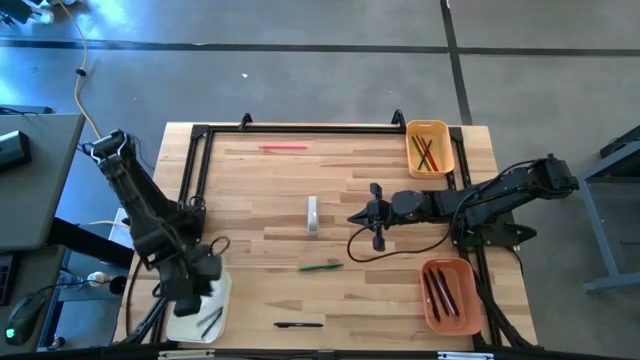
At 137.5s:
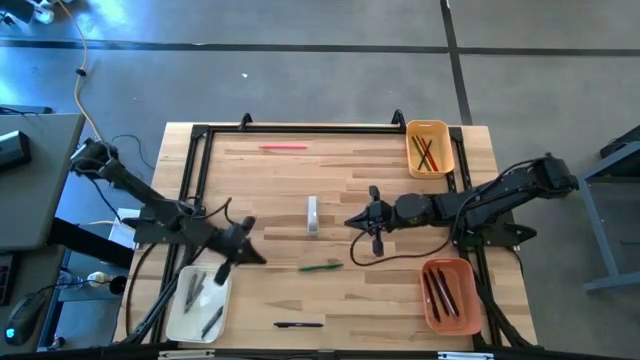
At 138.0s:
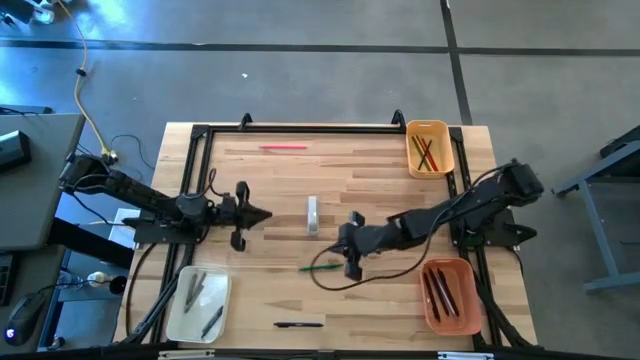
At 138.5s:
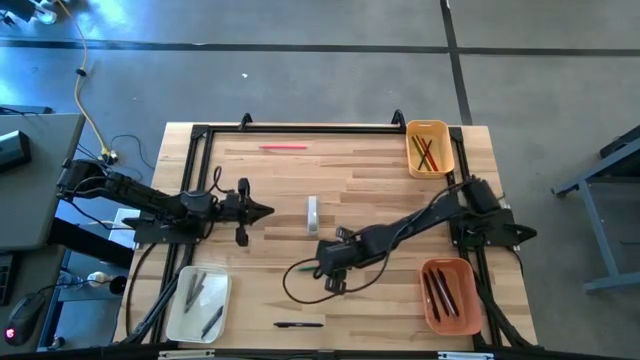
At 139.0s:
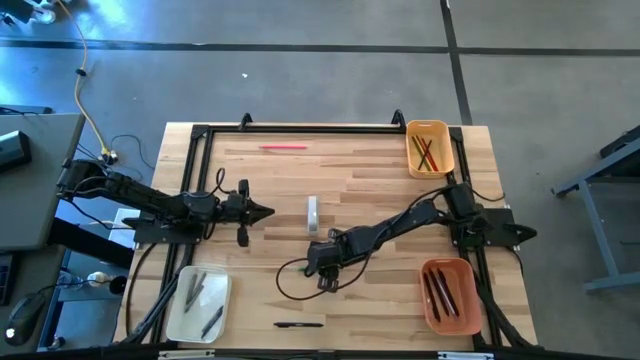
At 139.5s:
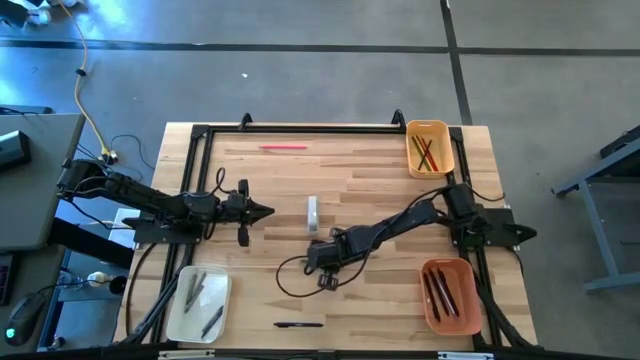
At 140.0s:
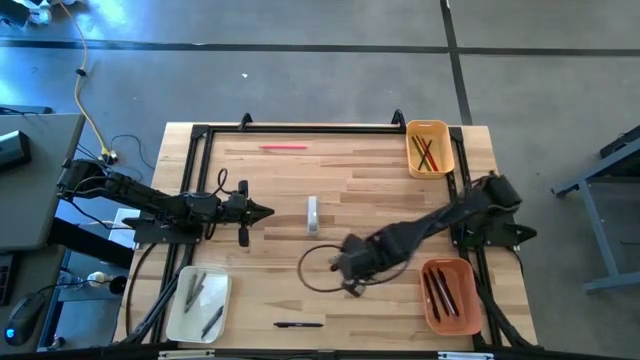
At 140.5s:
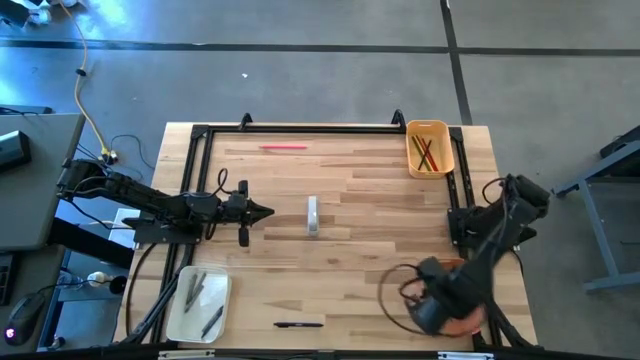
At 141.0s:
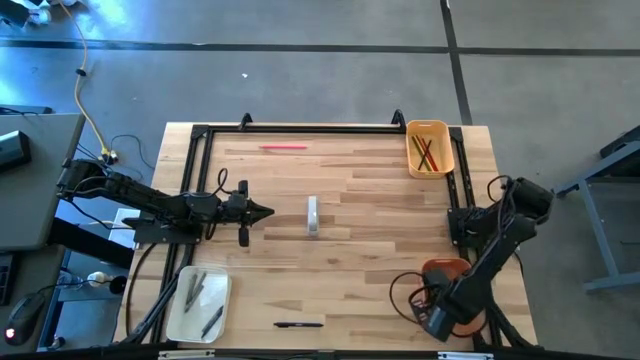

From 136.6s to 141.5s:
Task: Sort crayons/erasers/pens/pencils in bins
Put the green pen into the orange bin

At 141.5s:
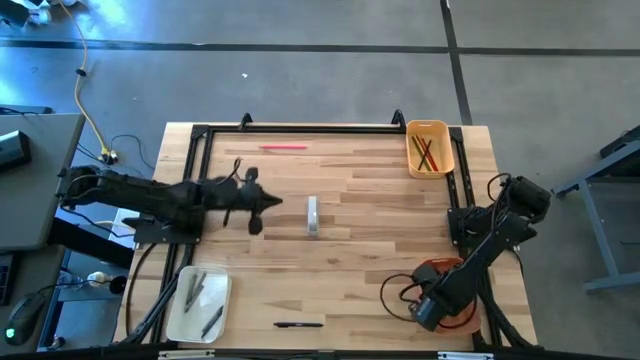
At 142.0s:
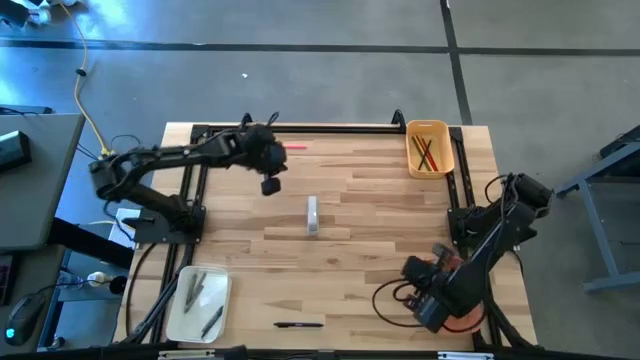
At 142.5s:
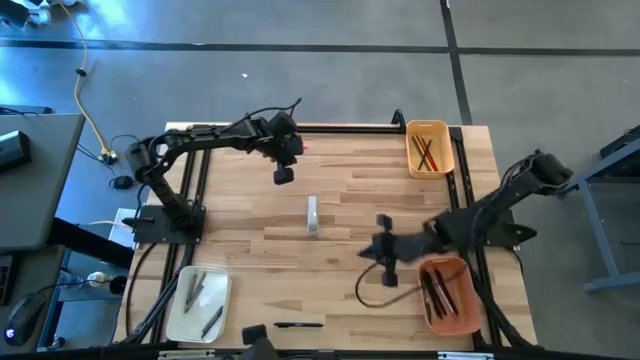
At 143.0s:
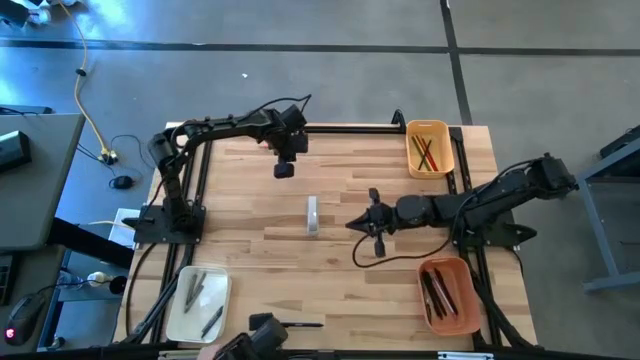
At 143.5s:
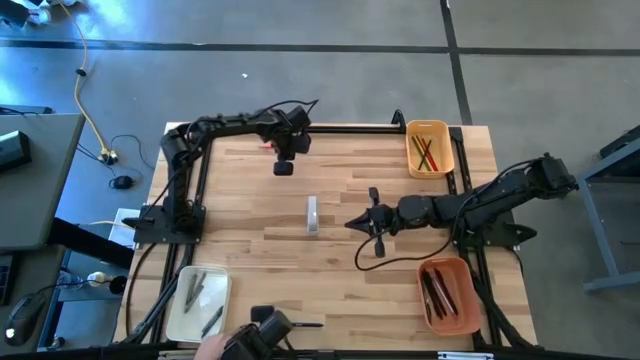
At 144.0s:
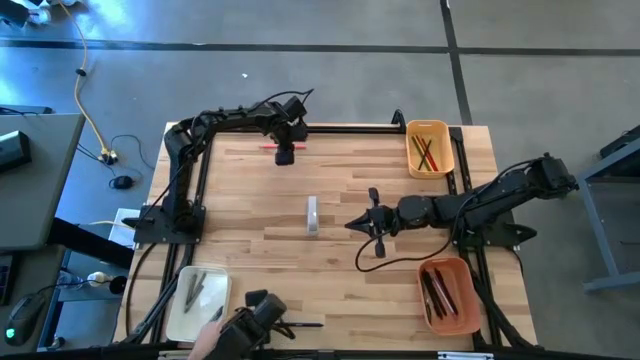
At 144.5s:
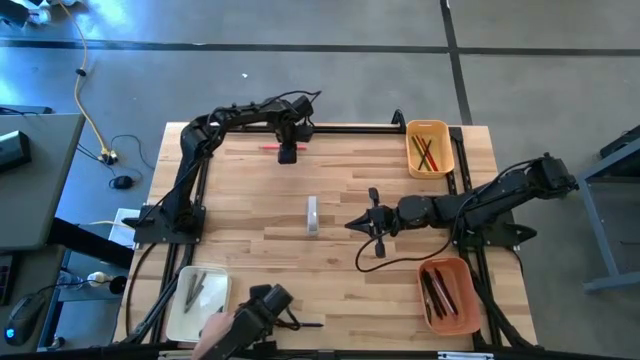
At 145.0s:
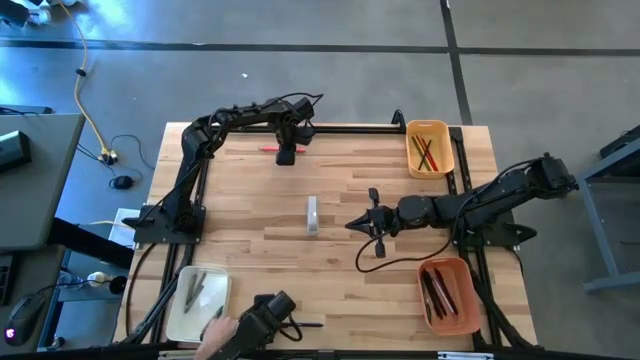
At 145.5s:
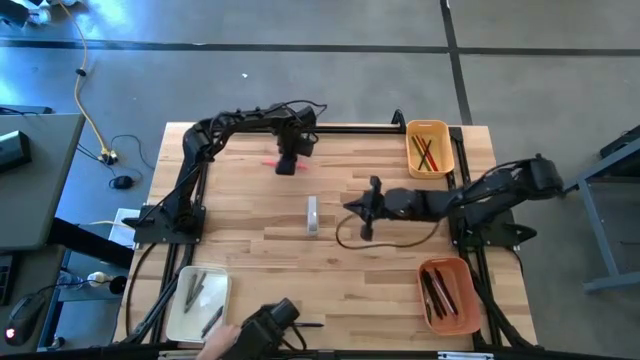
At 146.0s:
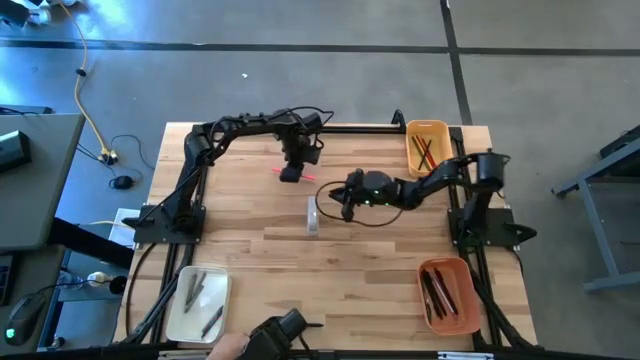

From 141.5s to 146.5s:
Put the pink pencil into the yellow bin

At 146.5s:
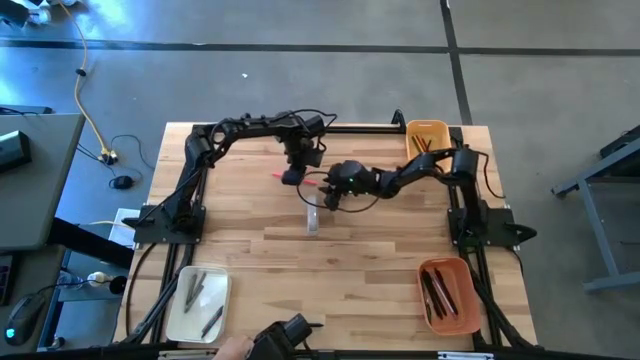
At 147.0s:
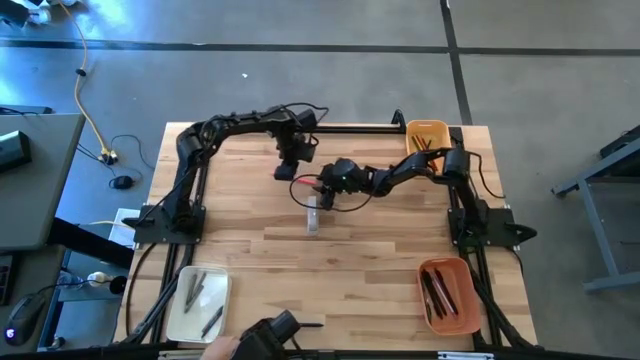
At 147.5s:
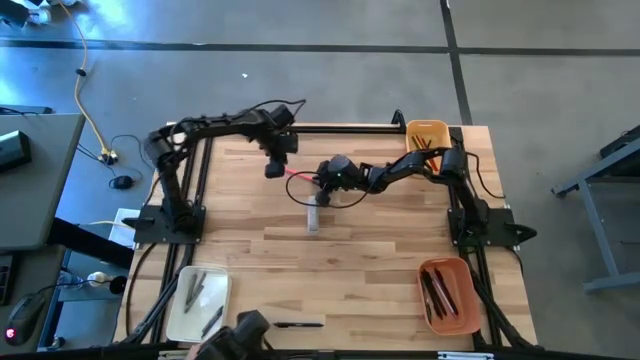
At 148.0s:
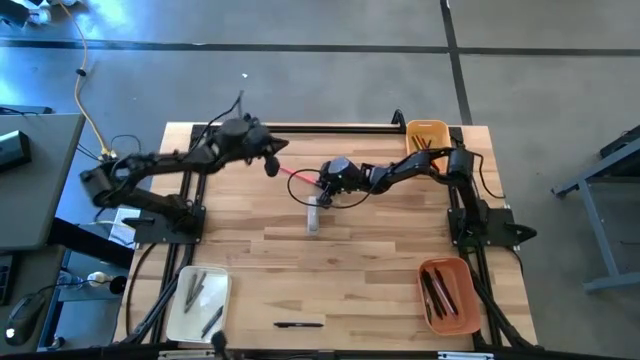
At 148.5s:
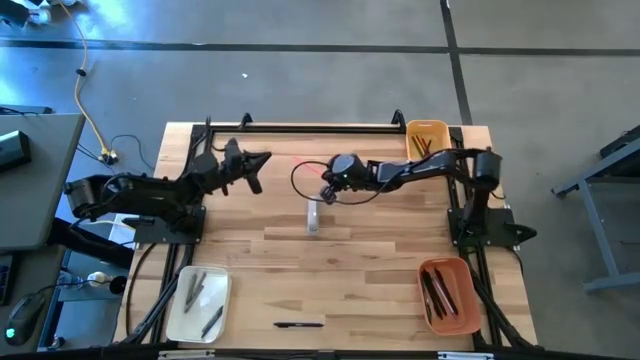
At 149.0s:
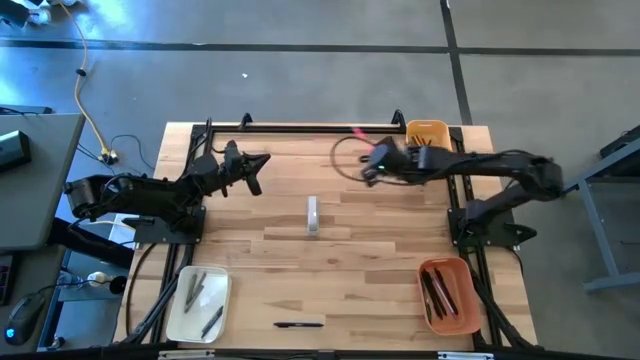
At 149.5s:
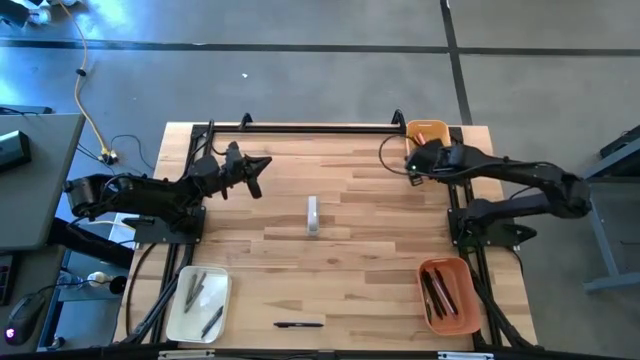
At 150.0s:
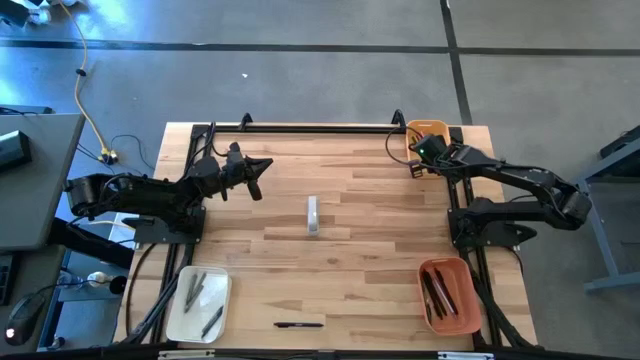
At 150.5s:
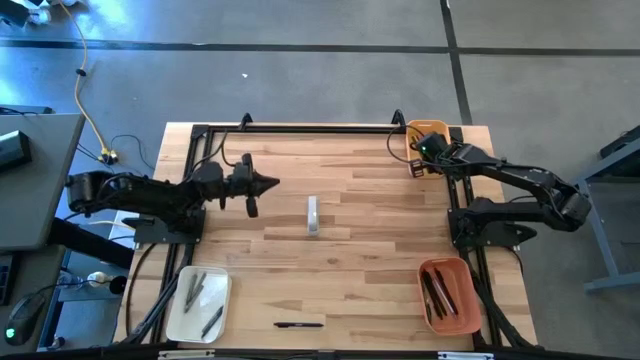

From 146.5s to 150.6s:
Put the pink pencil into the yellow bin

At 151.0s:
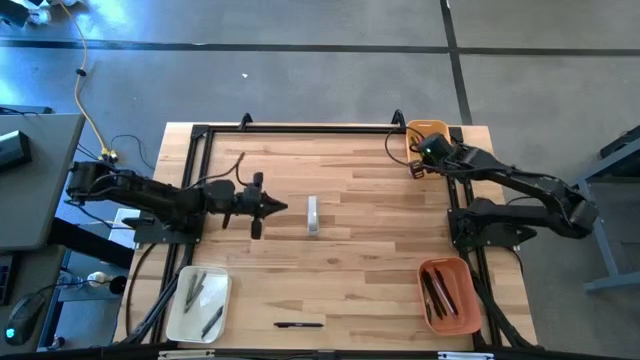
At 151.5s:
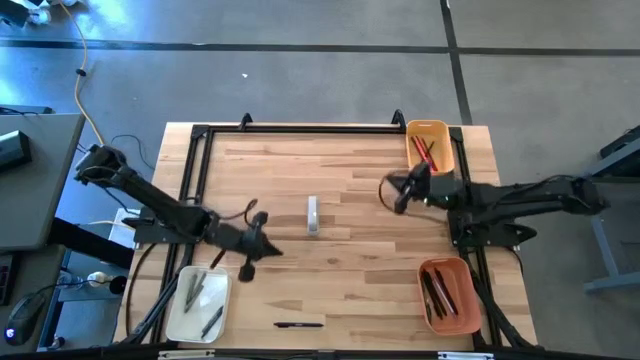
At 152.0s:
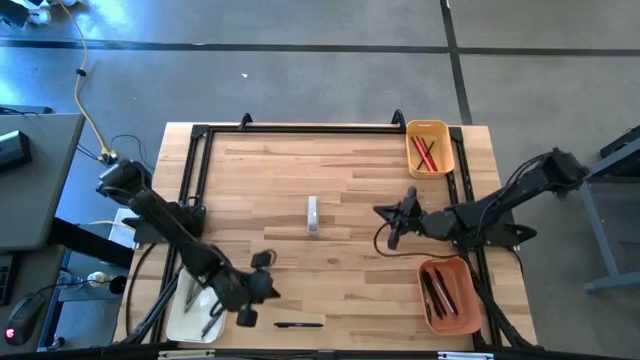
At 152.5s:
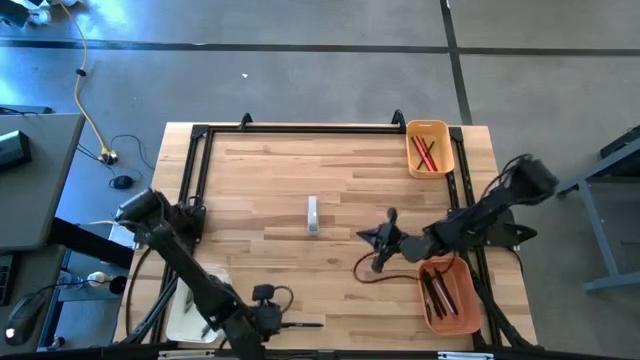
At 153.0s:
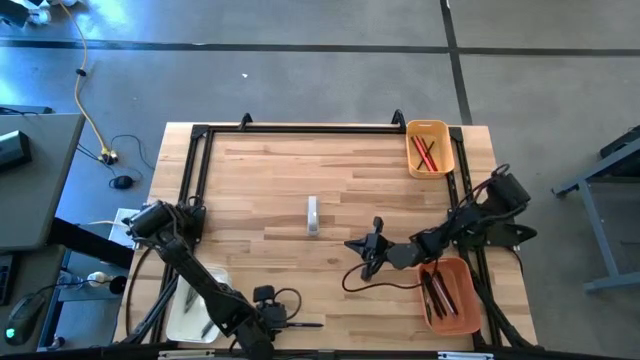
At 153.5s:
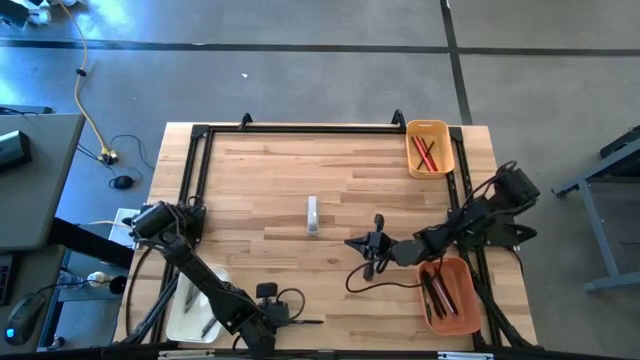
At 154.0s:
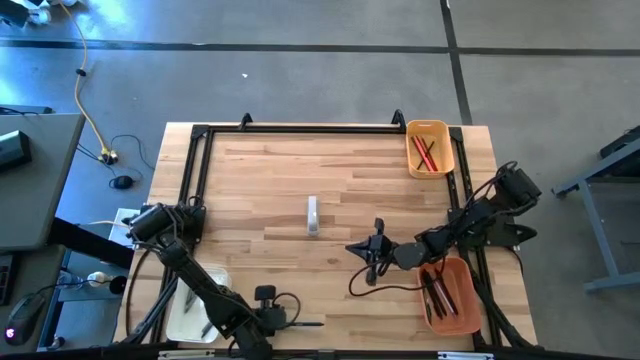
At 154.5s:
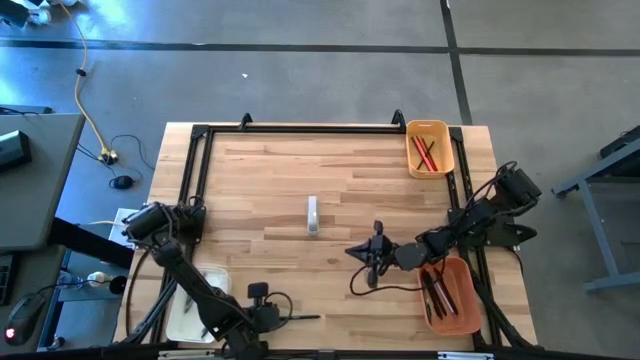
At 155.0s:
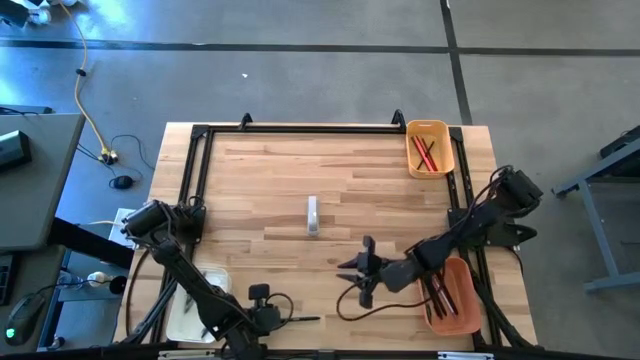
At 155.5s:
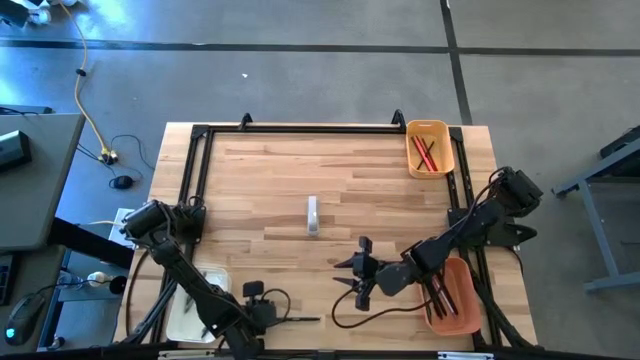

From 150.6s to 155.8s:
Put the black pen into the orange bin

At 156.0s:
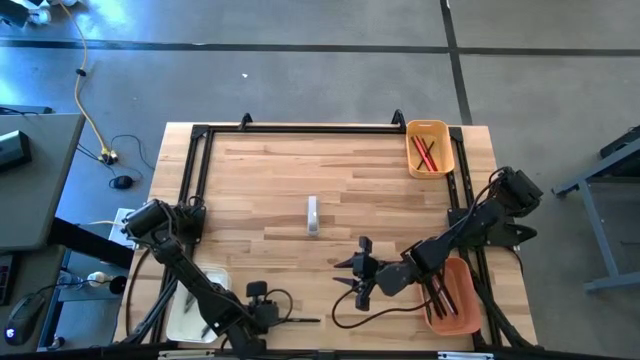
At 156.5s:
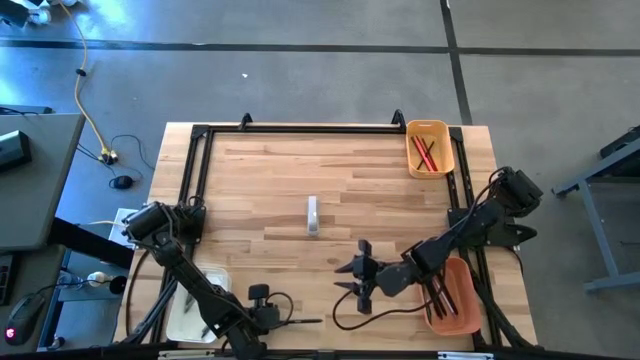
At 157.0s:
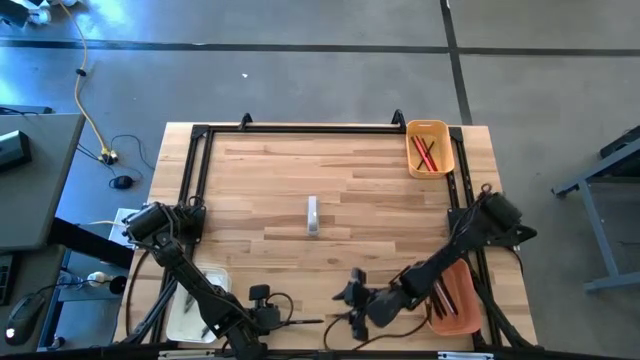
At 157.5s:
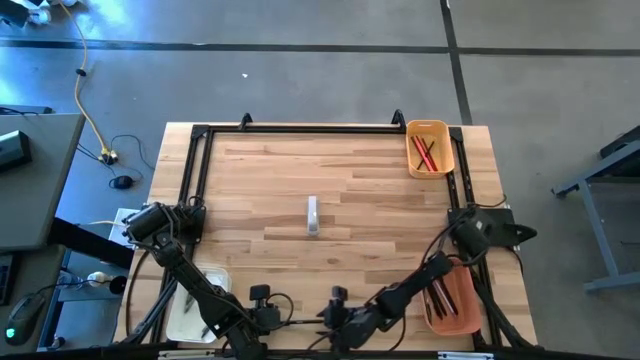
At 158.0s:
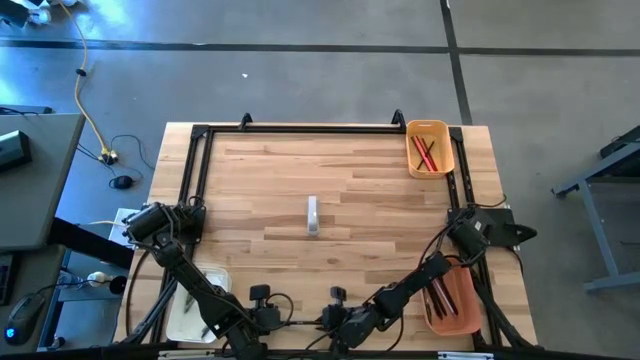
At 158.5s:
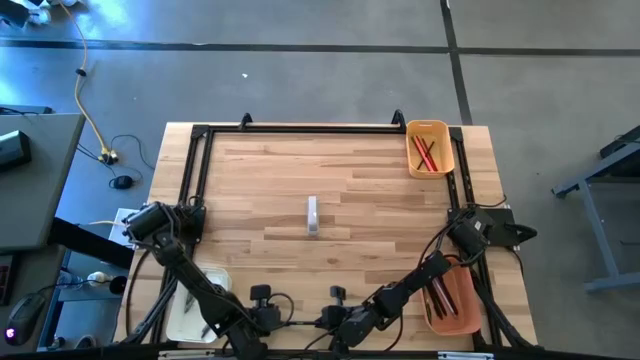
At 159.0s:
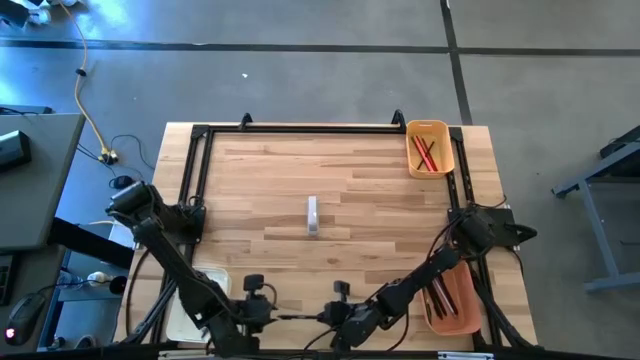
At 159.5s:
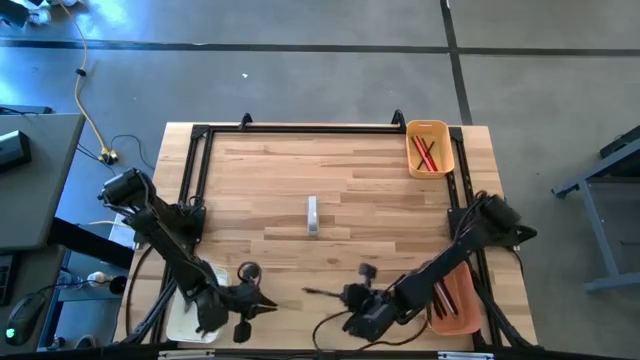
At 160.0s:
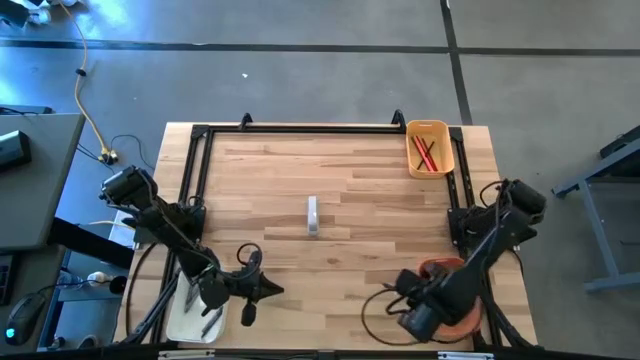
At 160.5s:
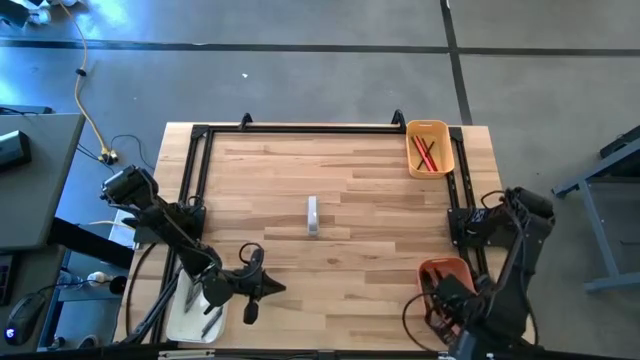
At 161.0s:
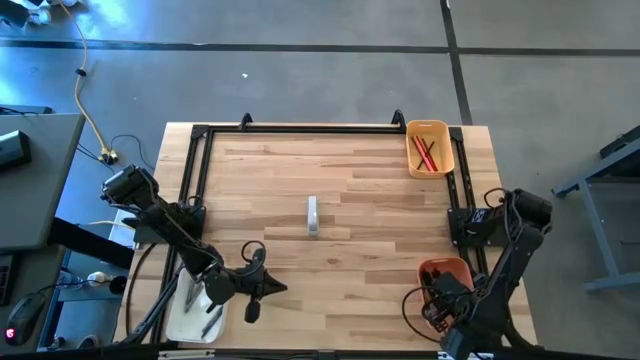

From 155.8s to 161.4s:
Put the black pen into the orange bin
